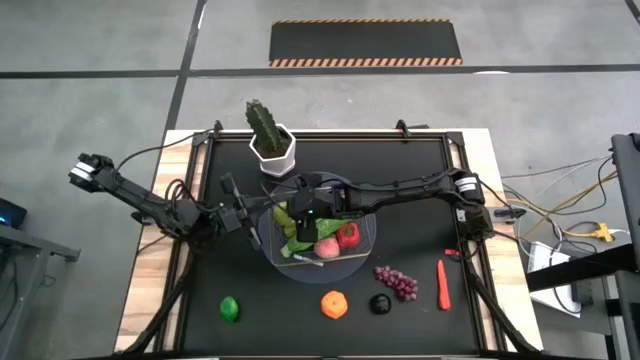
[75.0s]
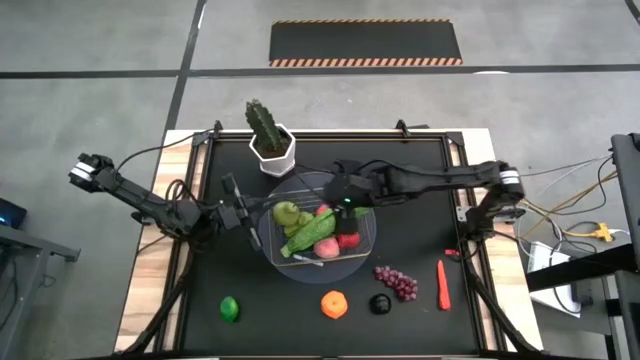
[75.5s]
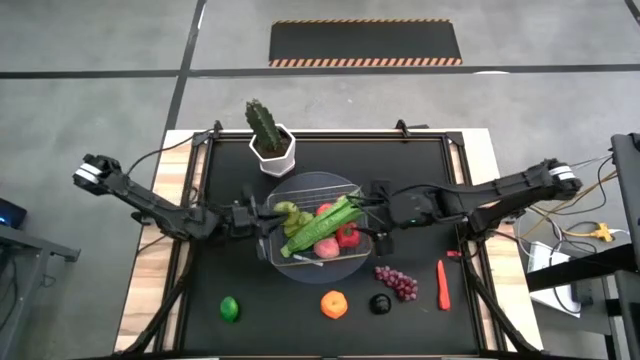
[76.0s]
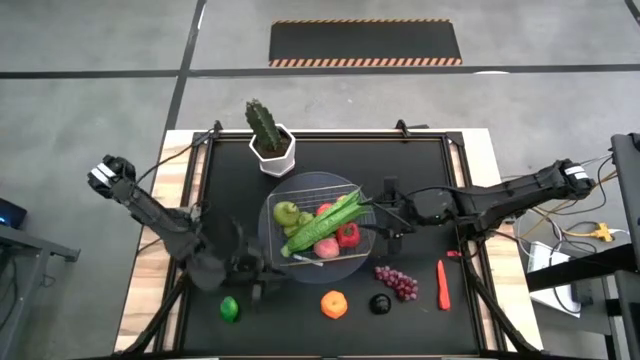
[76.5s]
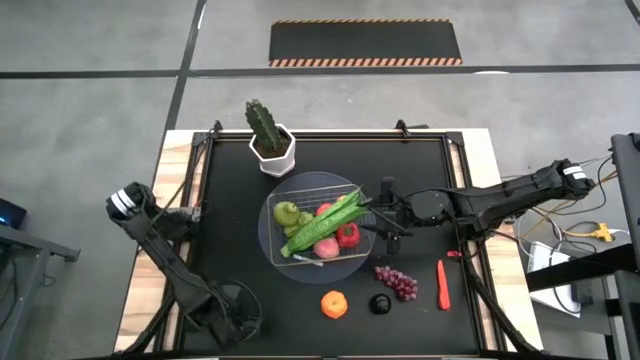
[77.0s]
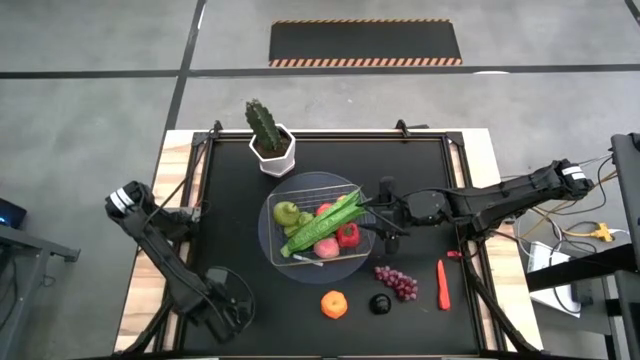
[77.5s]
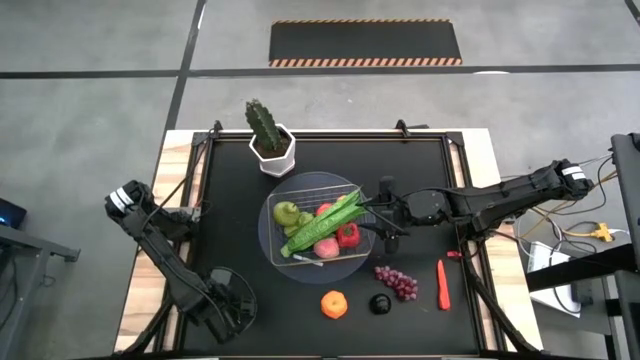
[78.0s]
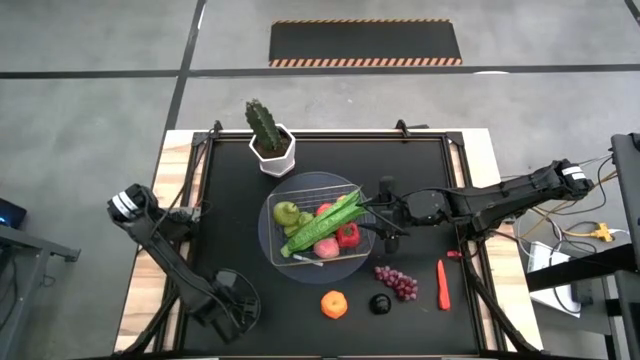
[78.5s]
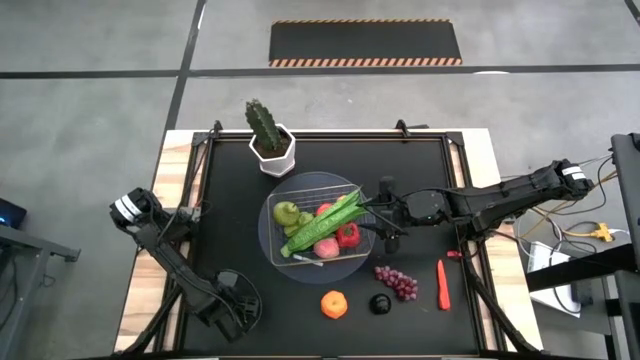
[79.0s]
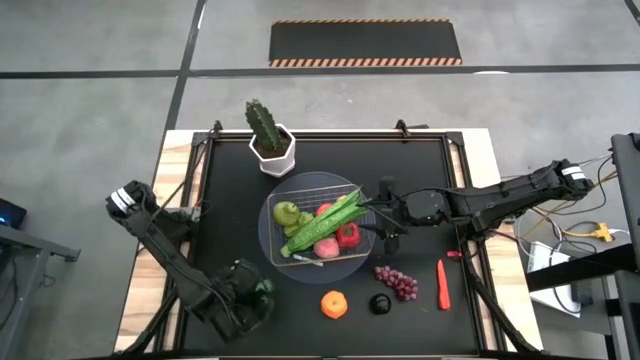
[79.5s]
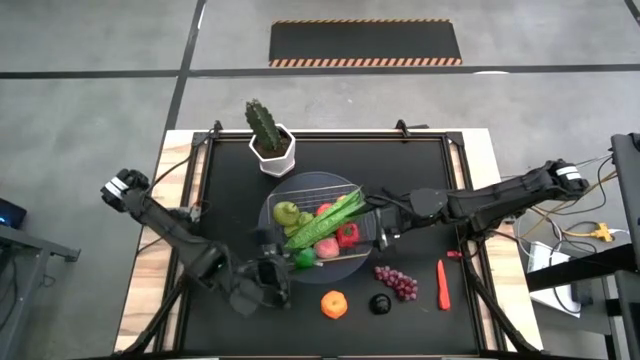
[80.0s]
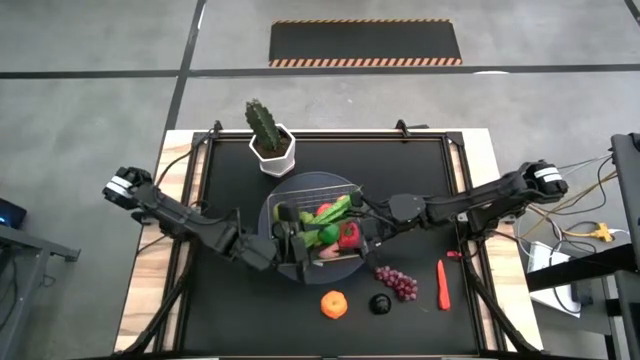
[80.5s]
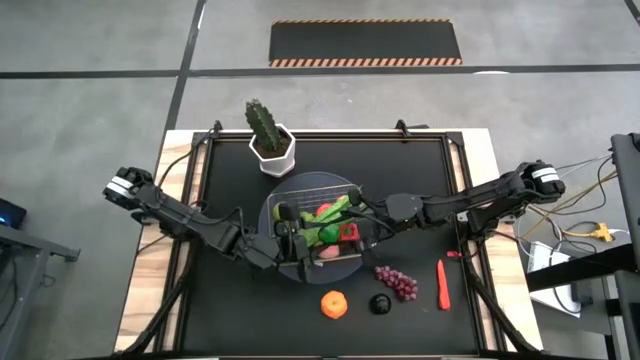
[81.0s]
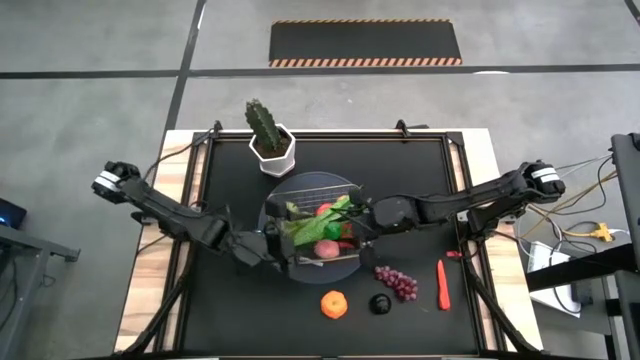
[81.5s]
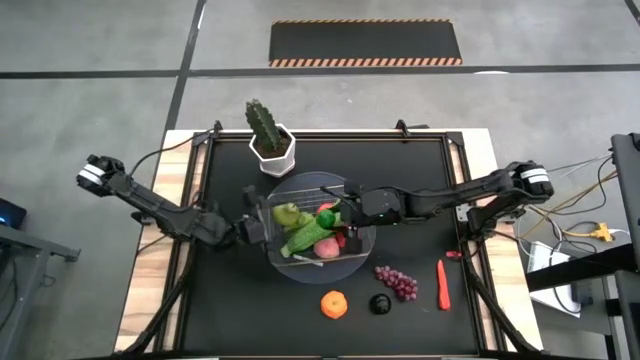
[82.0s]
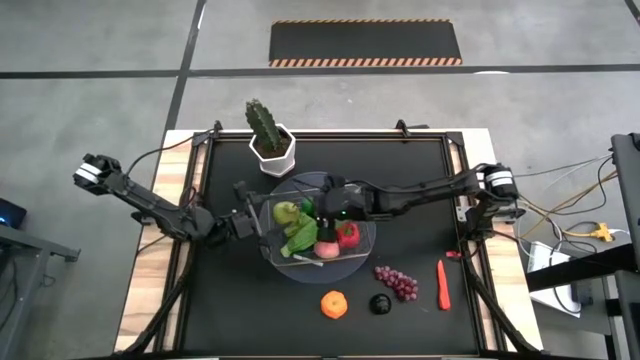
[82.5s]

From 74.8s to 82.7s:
Task: Build produce basket
Put the lime into the wire basket

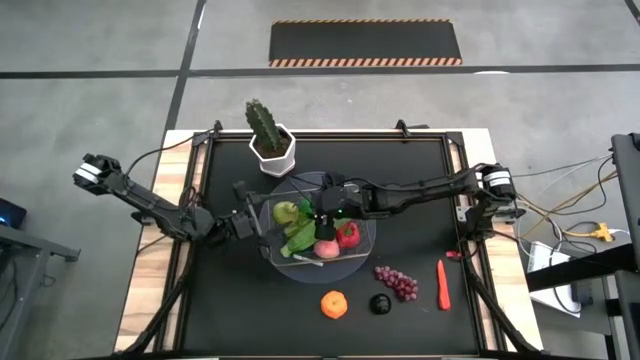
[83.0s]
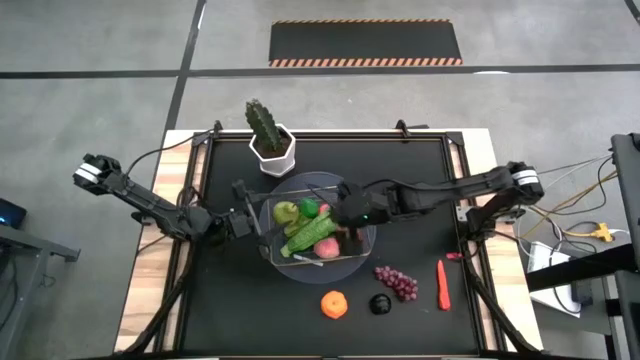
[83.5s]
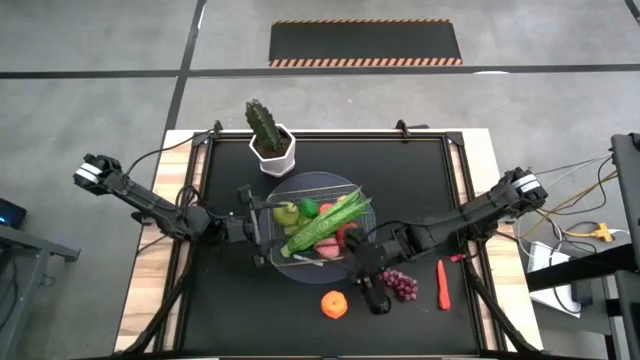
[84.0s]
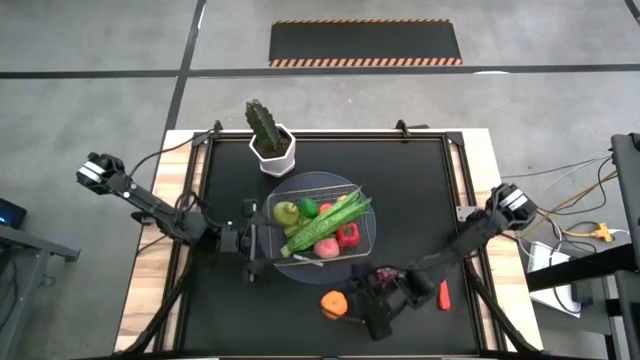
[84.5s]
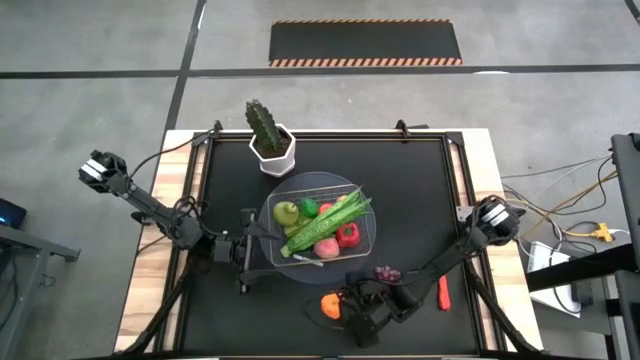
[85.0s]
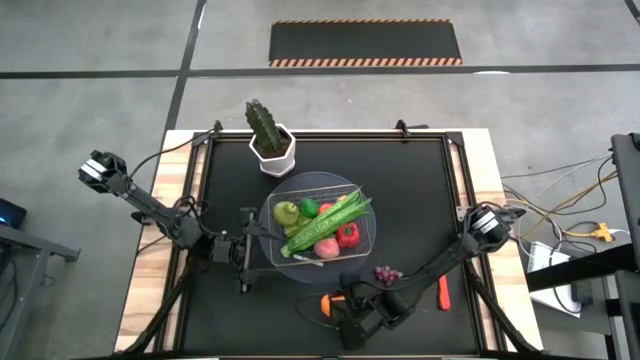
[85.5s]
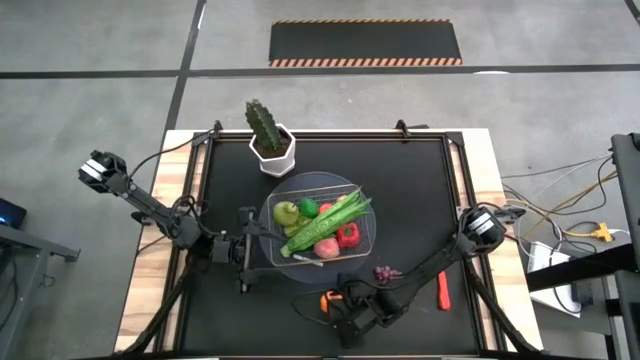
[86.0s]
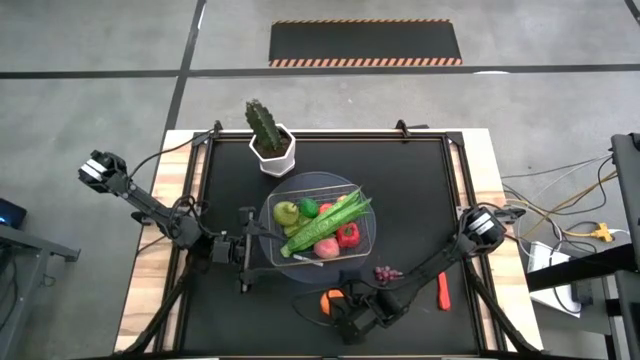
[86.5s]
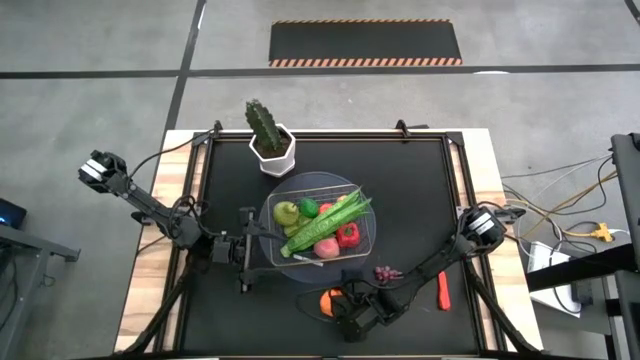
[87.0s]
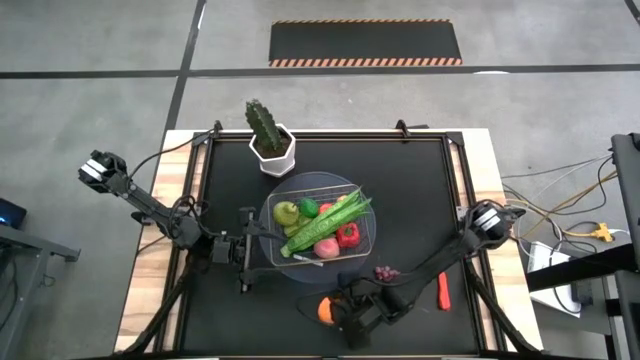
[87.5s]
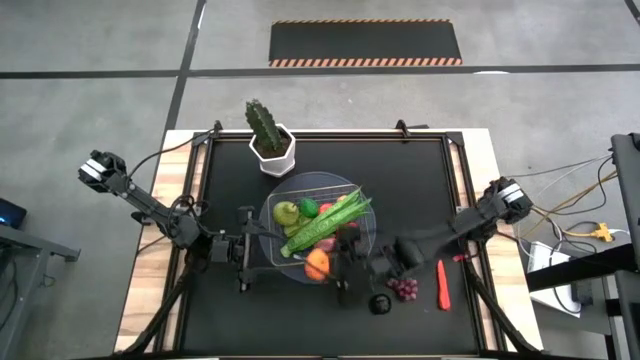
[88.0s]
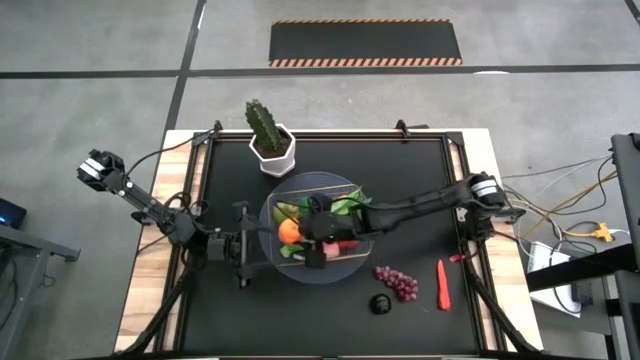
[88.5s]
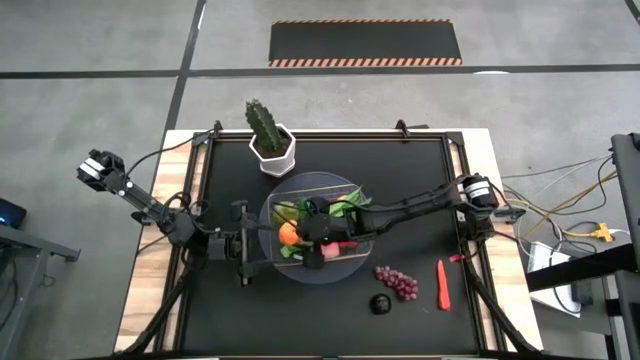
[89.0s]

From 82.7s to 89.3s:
Put the orange into the wire basket

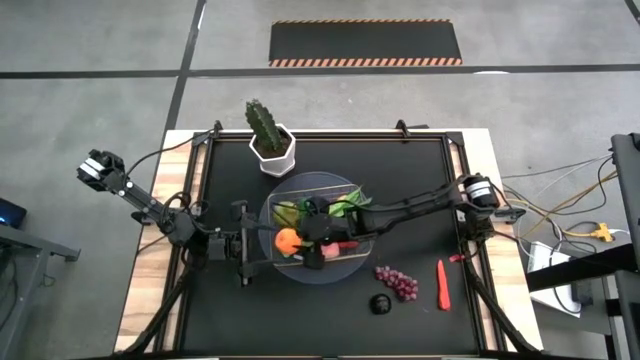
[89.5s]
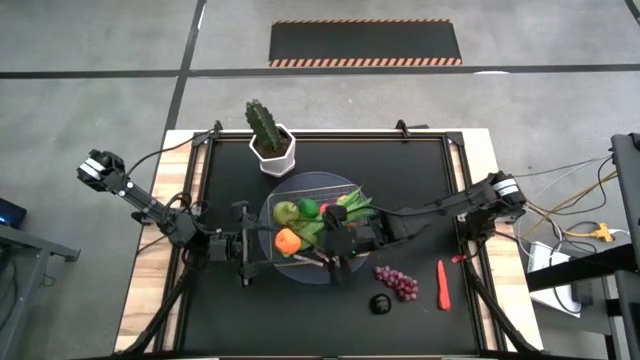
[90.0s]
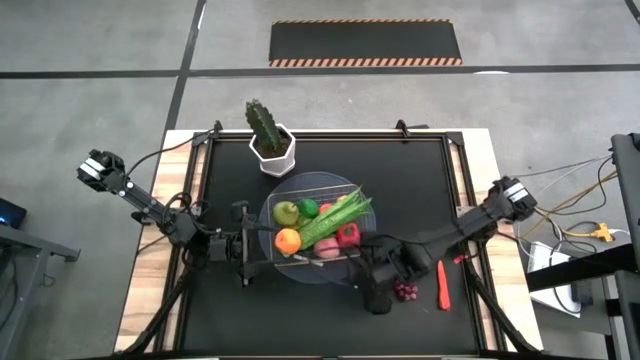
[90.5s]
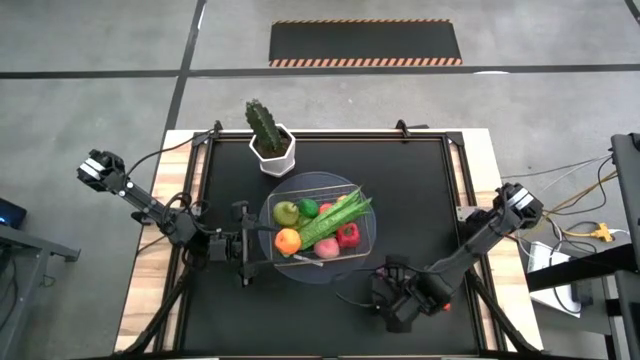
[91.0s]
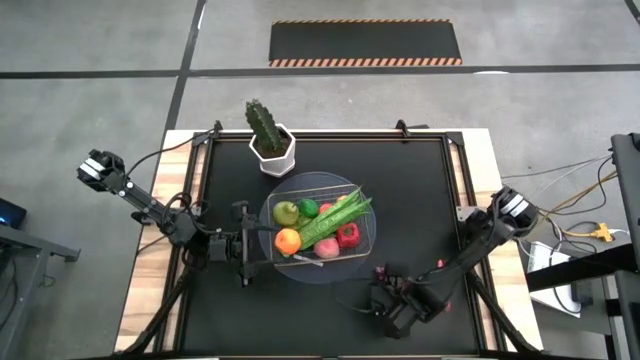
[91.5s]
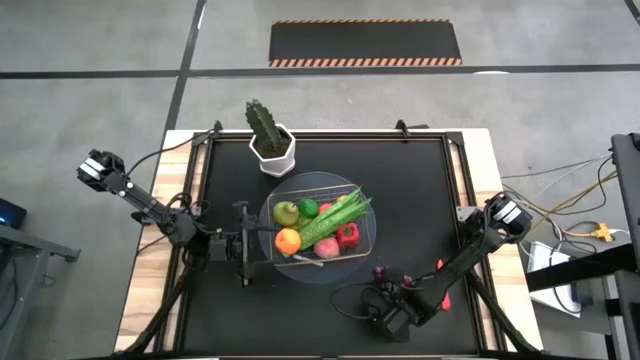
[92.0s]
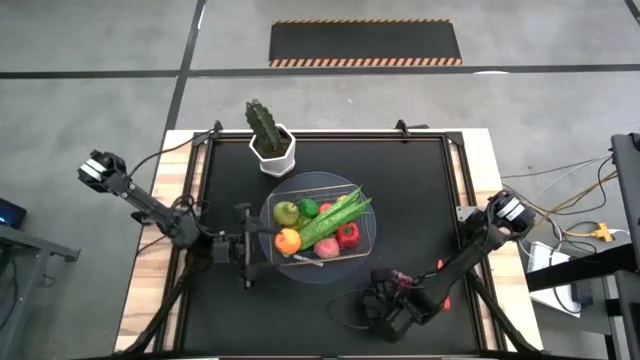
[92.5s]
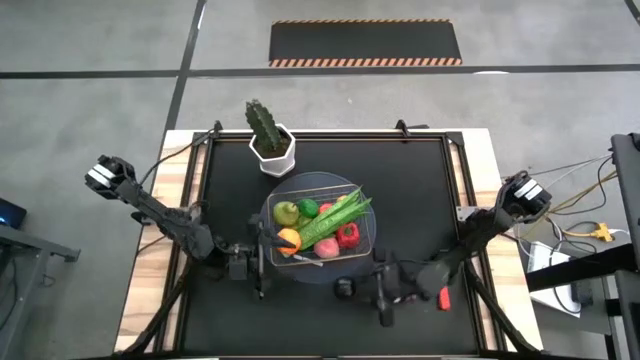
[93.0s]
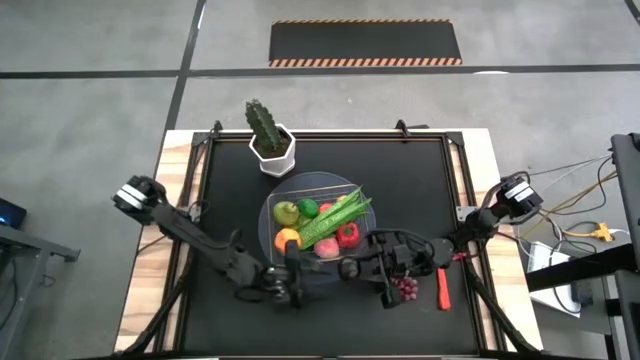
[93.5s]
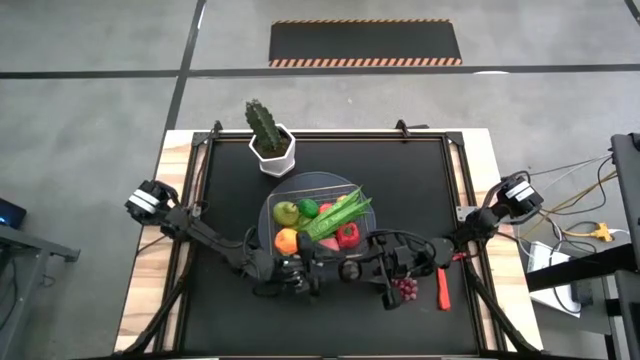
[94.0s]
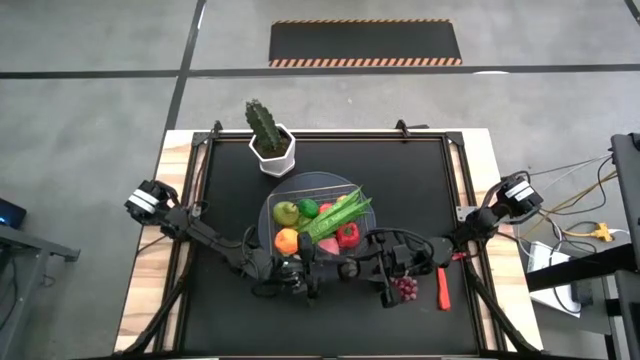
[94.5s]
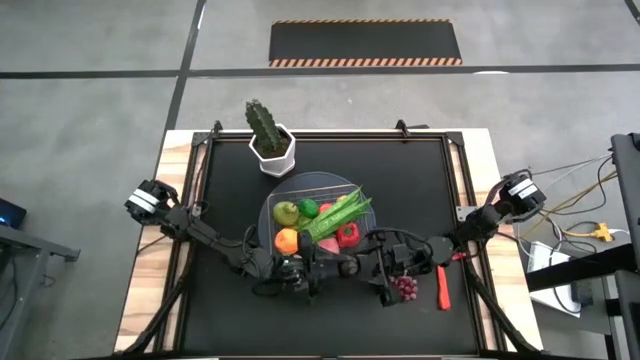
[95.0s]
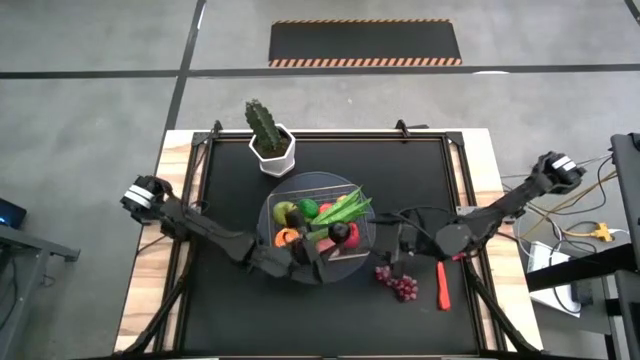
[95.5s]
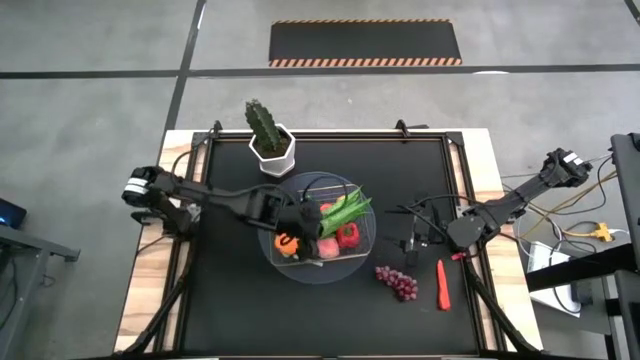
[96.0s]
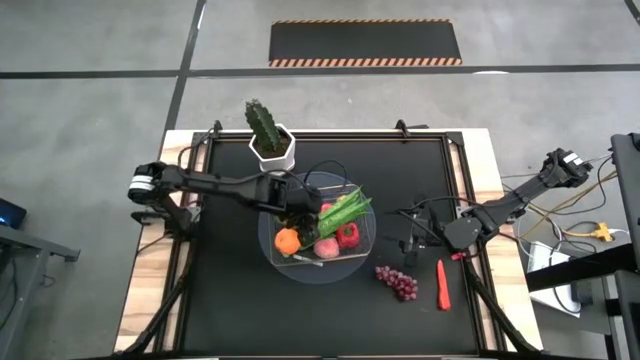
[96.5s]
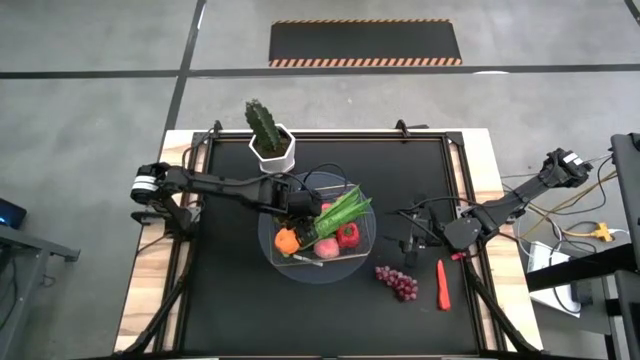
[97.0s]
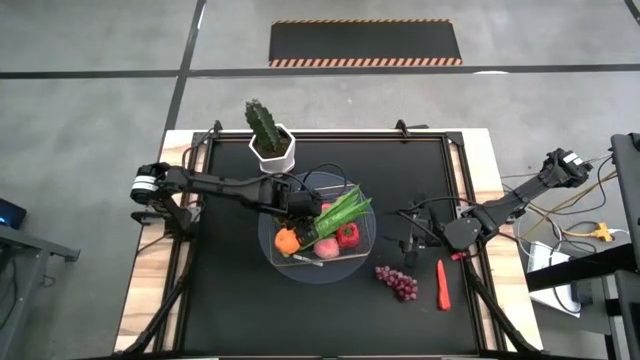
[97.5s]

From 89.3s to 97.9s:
Put the plum into the wire basket
